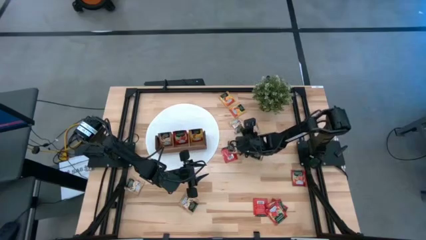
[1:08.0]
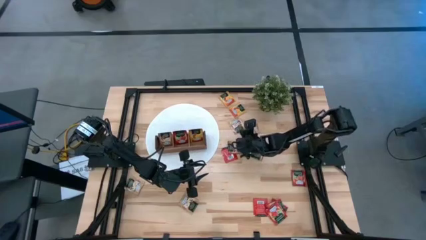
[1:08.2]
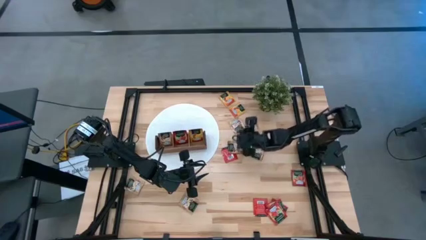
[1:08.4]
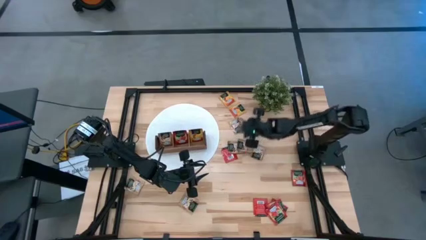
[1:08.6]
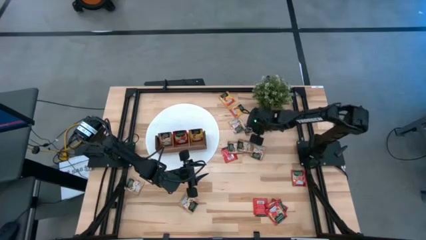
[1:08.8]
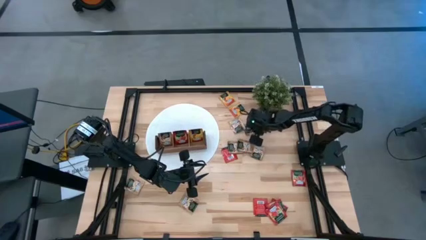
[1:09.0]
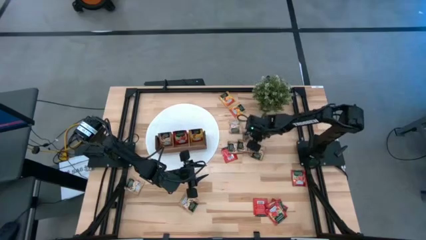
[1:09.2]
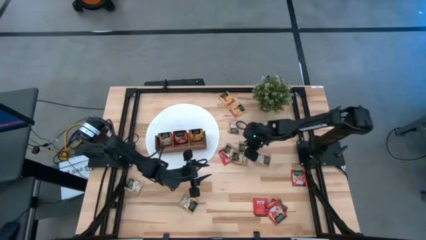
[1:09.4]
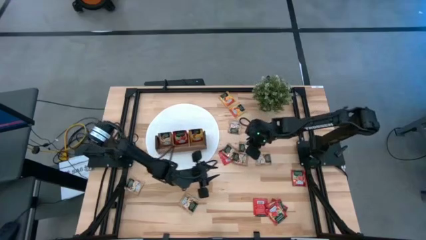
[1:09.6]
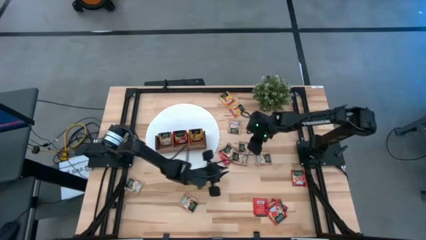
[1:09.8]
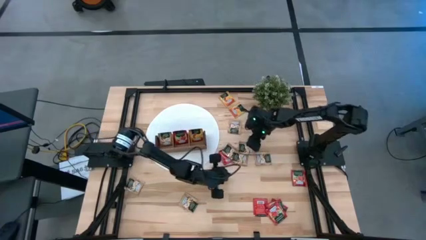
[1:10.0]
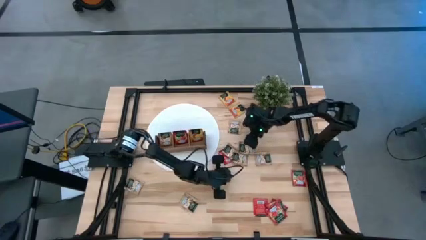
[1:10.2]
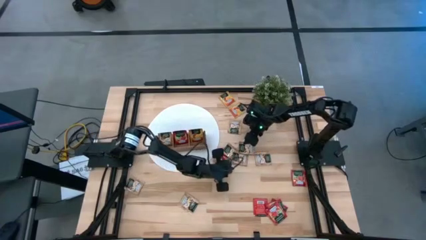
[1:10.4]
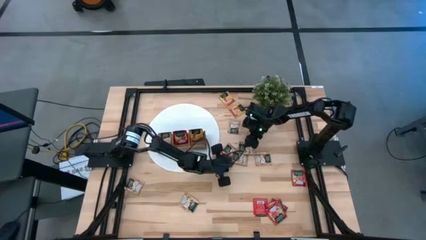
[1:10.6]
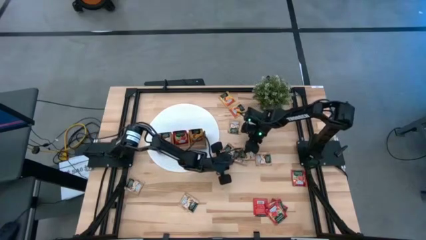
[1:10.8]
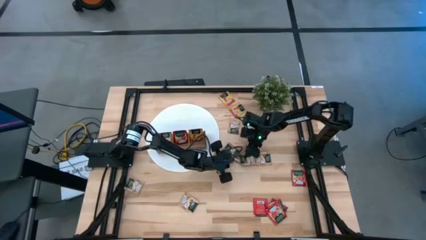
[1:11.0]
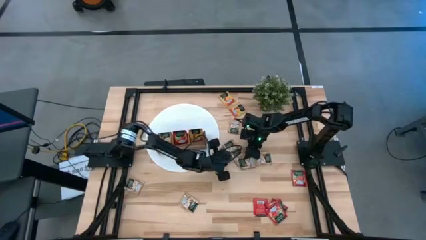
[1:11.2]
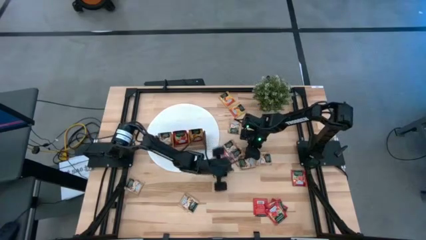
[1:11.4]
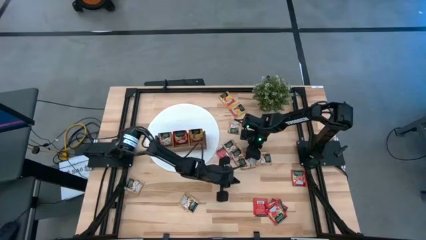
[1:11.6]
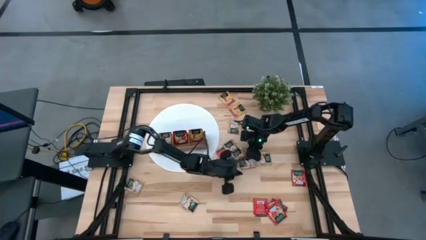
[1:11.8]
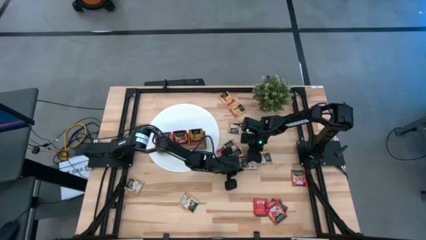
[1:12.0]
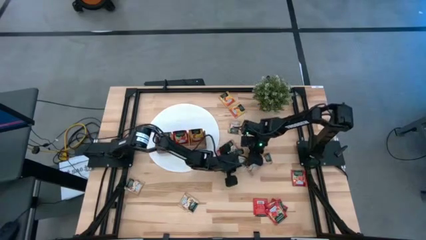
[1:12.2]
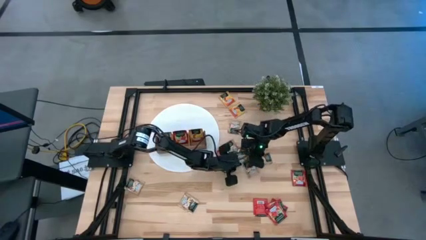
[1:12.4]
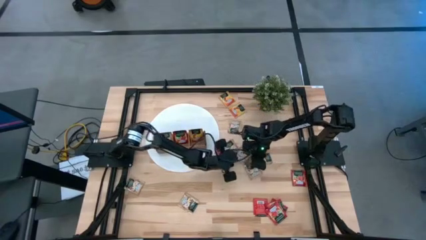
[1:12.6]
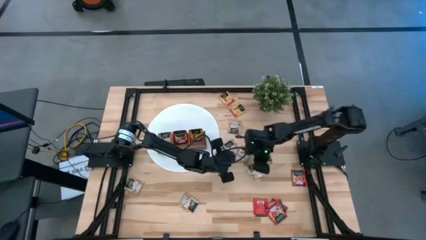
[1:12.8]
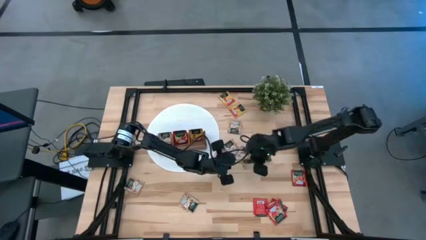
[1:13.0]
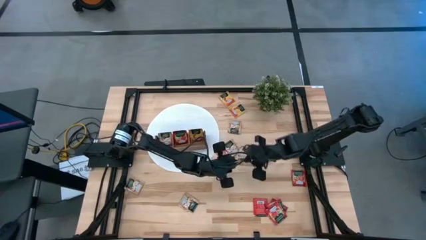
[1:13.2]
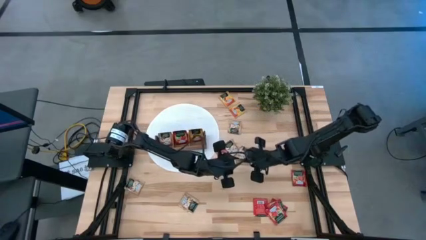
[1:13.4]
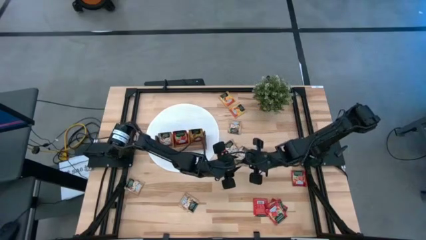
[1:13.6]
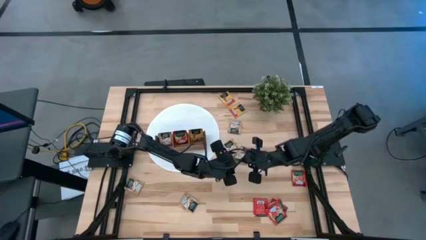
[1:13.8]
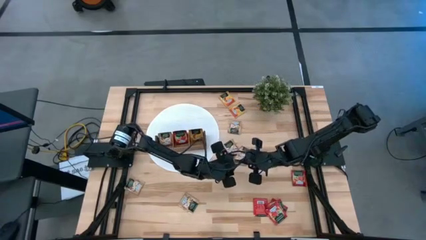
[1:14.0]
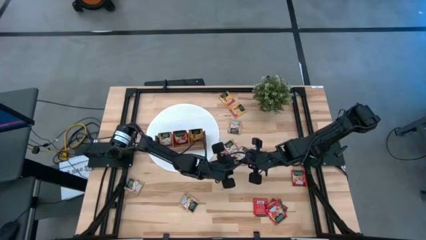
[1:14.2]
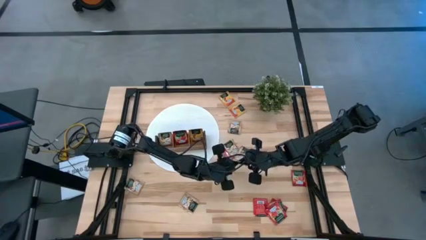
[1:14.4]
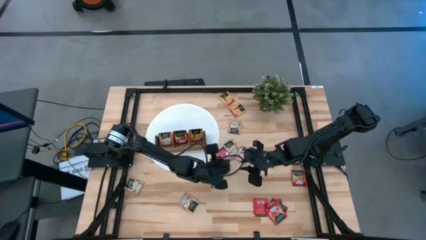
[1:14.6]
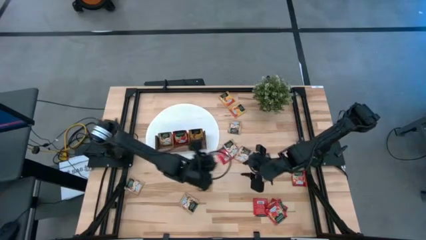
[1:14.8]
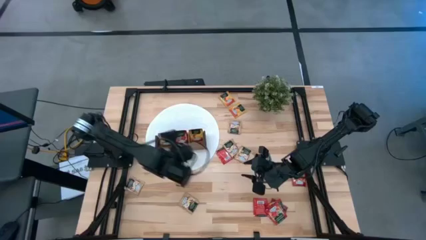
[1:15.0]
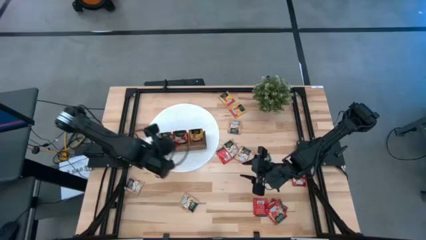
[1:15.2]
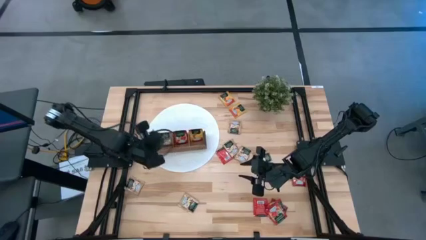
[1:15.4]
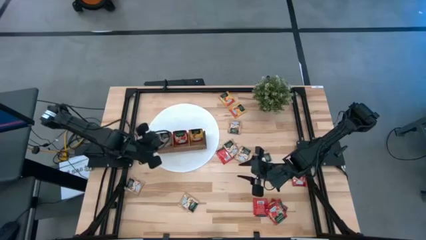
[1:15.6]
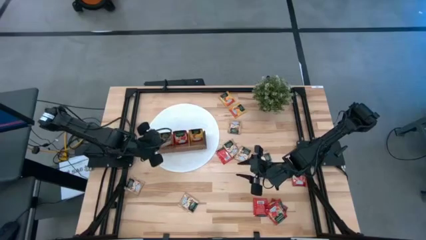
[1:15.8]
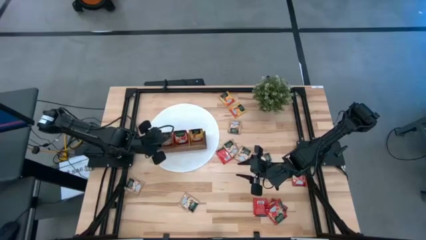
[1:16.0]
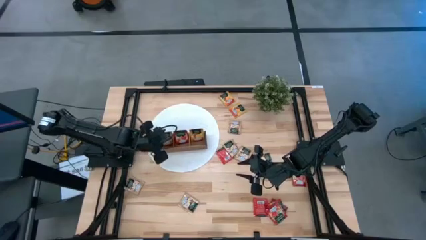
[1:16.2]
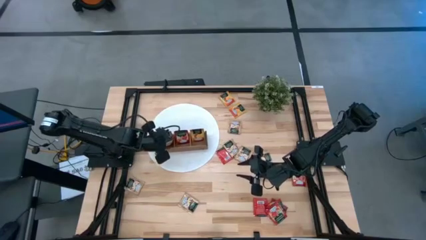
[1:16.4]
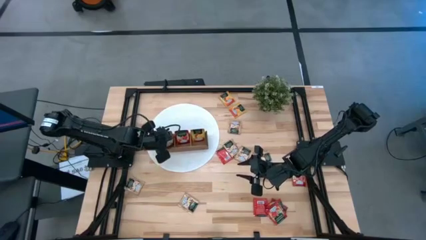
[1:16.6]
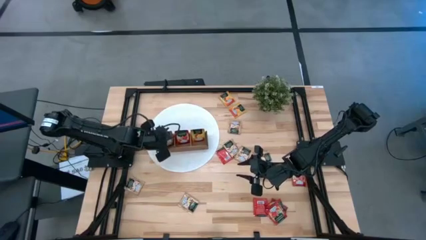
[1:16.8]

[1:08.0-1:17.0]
Task: Pick & Place Tea
Put the brown tea bag into the left section of the wooden organizer

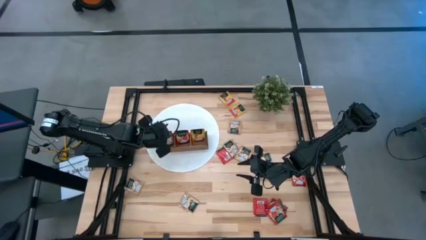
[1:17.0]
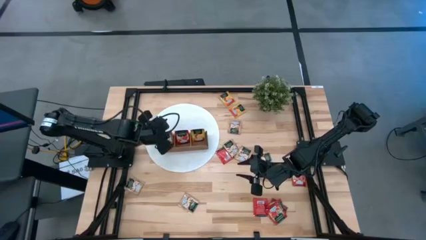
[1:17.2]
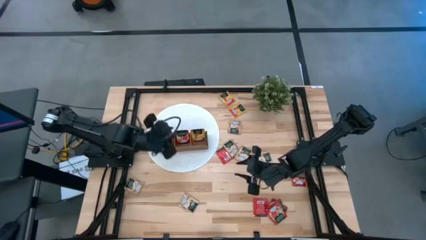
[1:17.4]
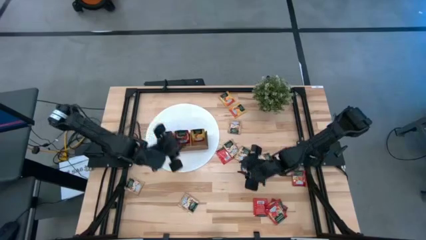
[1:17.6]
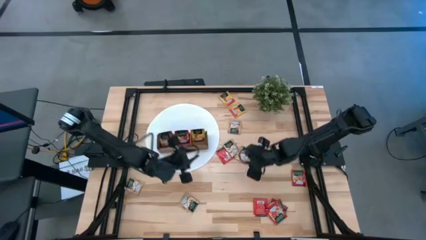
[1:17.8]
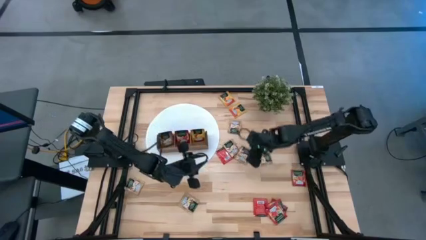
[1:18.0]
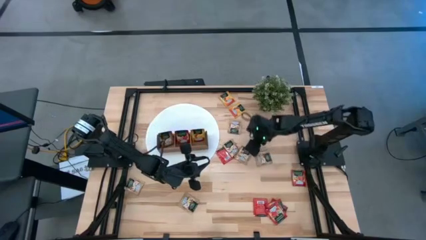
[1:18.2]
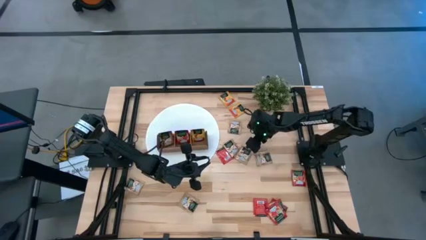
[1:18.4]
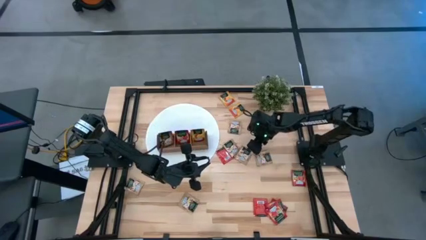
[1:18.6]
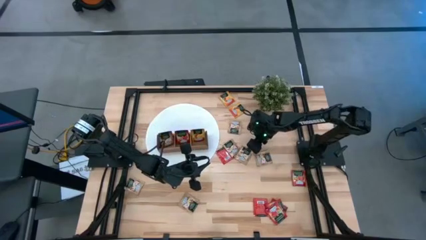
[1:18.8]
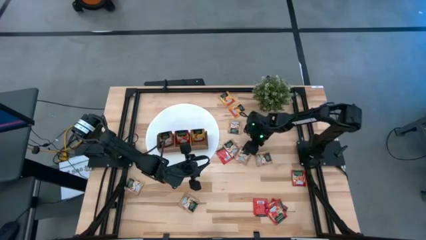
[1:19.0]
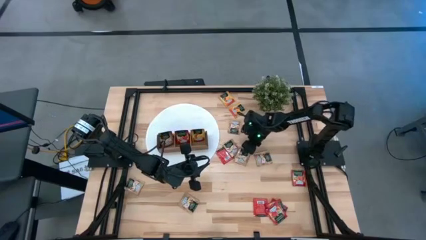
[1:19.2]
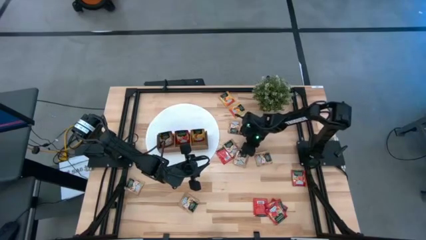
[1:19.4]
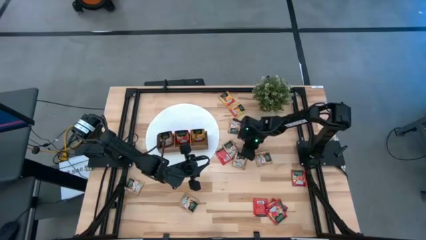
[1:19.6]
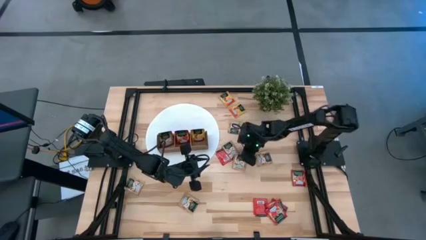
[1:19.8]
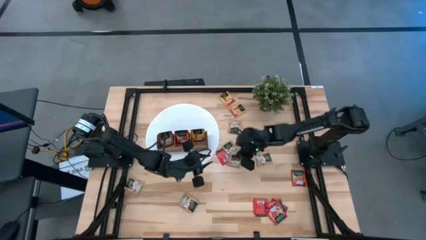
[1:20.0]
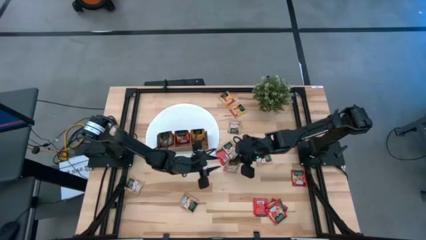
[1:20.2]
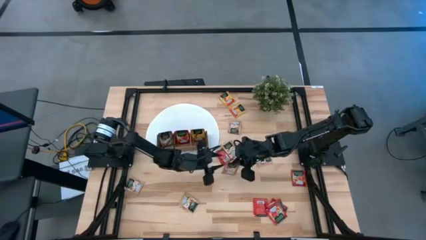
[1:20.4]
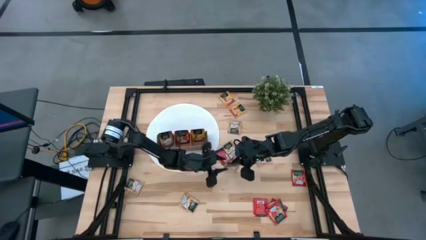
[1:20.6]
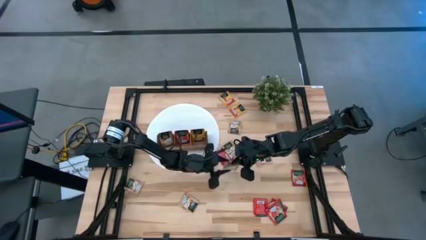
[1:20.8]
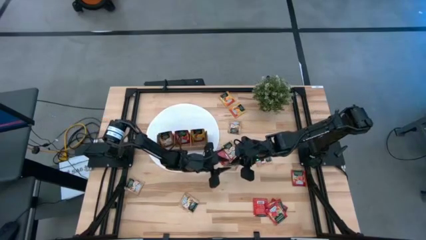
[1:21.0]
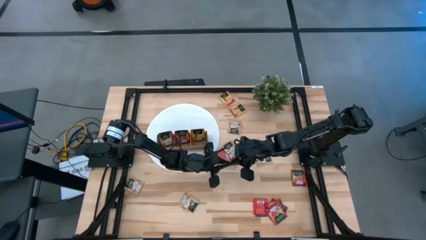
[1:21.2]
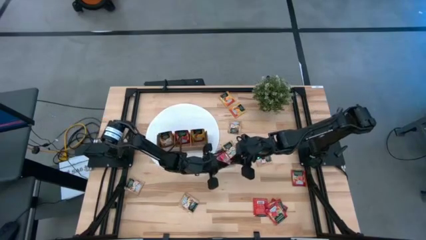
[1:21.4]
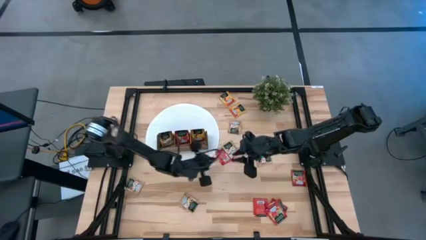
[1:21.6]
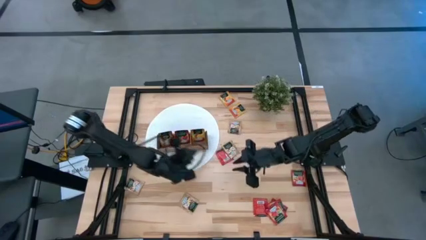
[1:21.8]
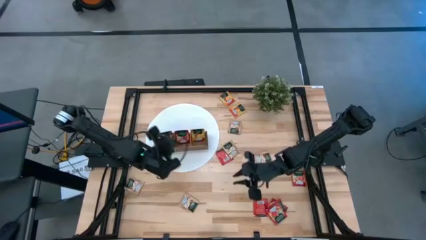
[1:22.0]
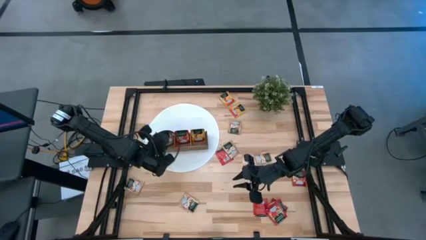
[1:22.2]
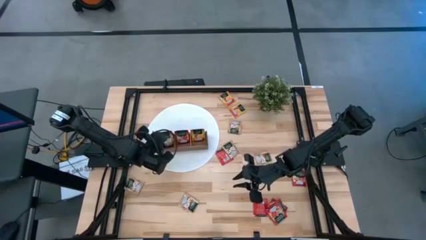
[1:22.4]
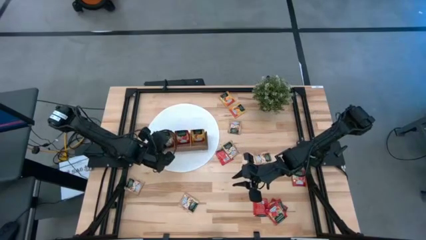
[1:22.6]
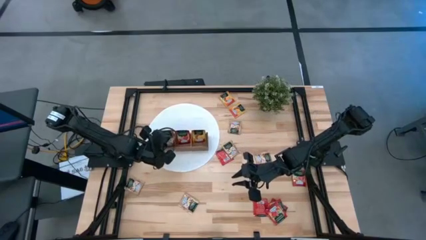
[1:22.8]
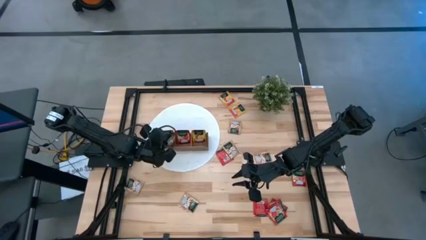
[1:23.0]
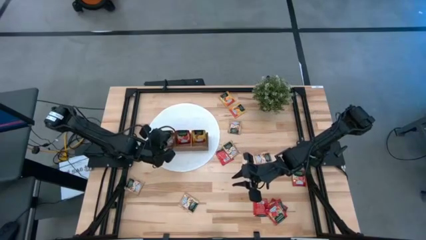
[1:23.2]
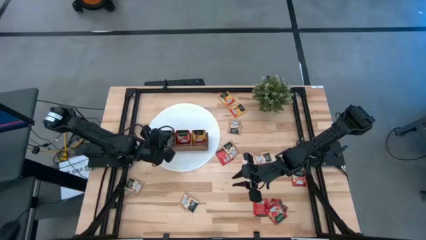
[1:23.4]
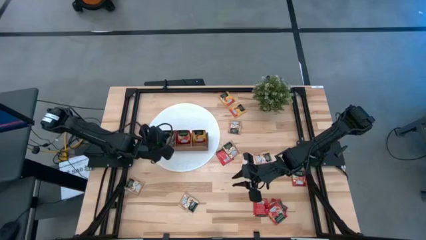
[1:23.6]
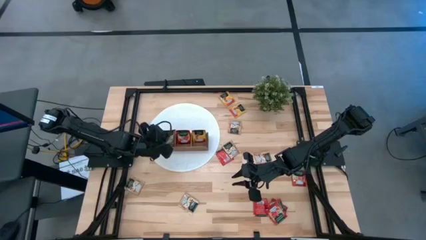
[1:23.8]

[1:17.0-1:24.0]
Put the brown tea bag into the left section of the wooden organizer
